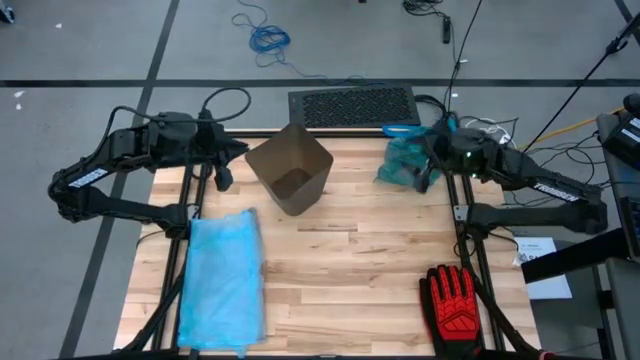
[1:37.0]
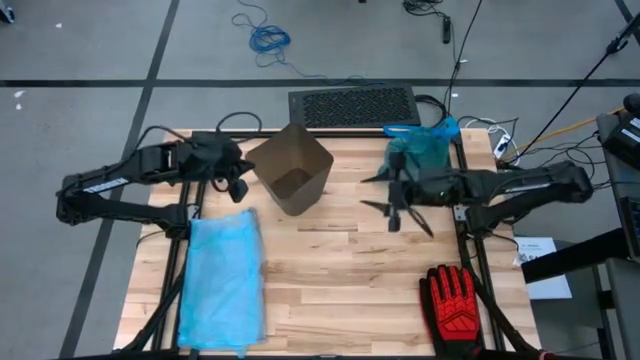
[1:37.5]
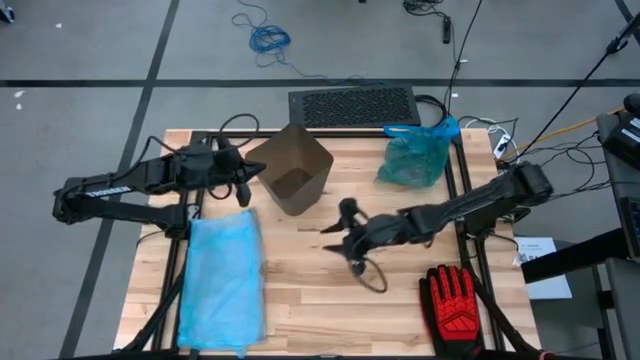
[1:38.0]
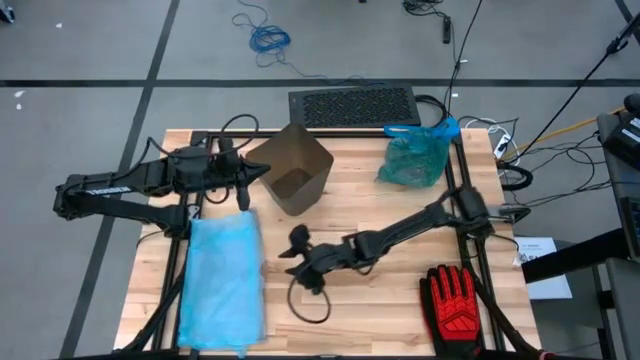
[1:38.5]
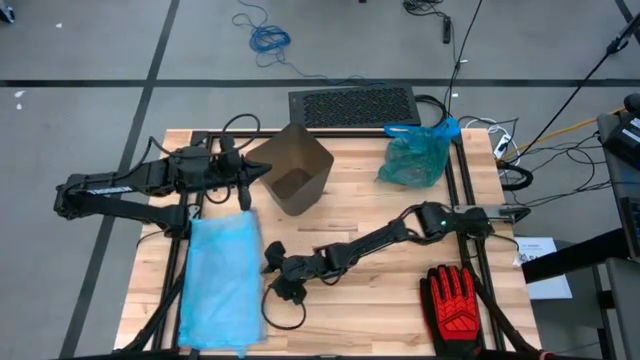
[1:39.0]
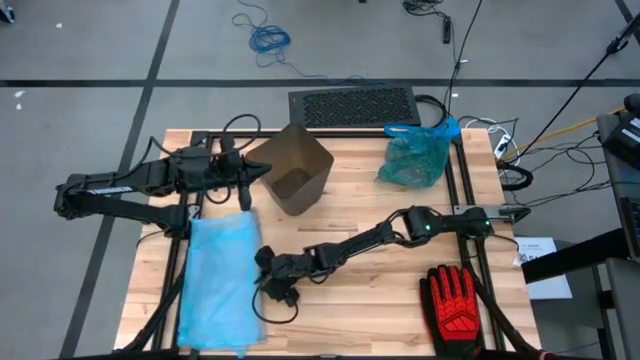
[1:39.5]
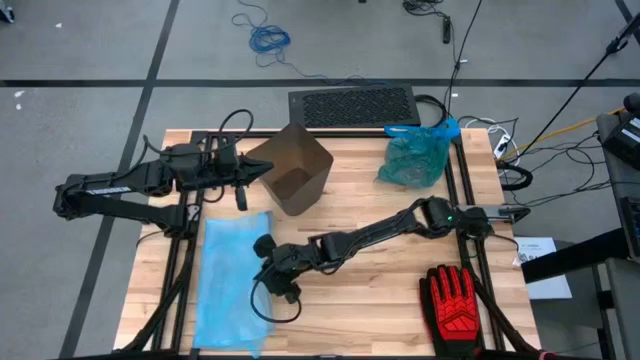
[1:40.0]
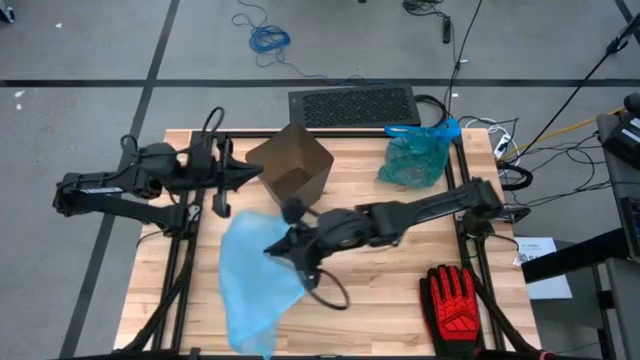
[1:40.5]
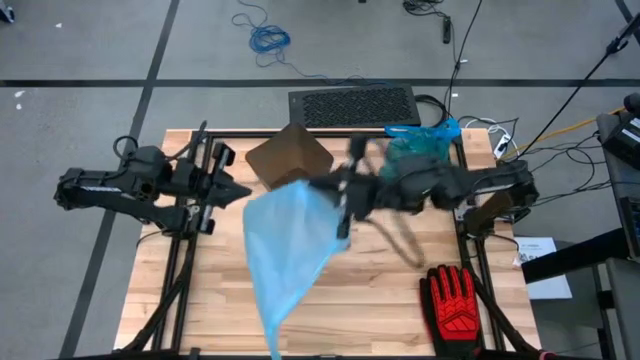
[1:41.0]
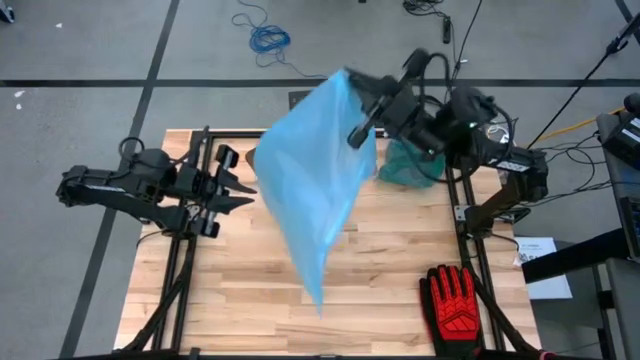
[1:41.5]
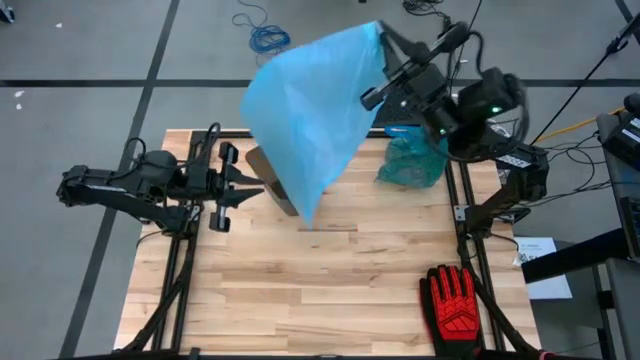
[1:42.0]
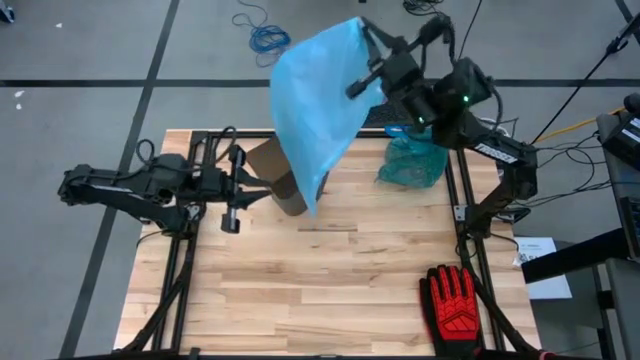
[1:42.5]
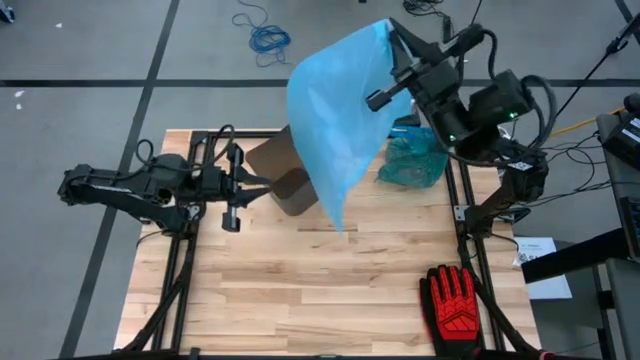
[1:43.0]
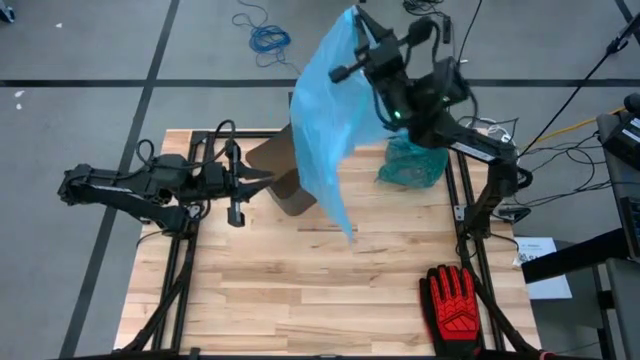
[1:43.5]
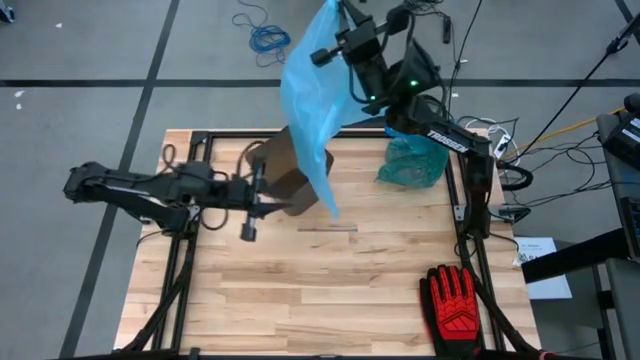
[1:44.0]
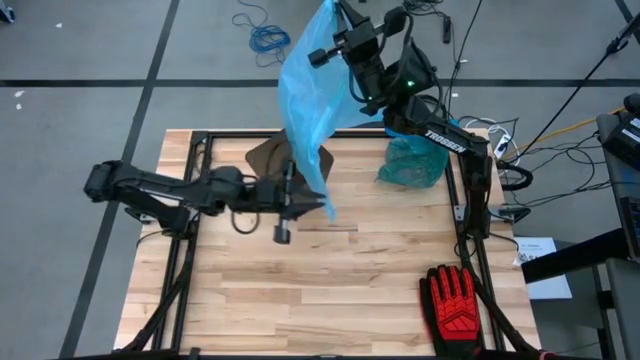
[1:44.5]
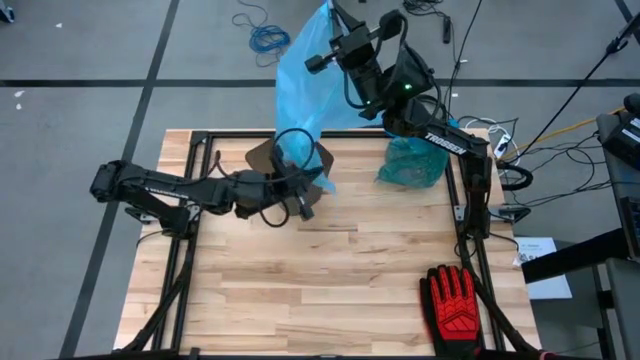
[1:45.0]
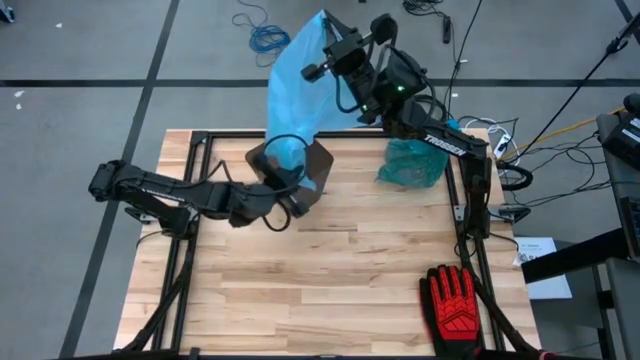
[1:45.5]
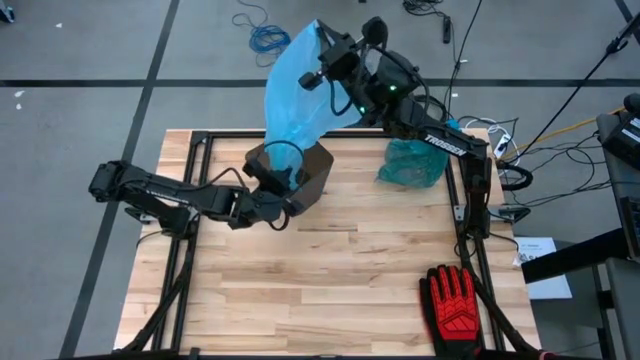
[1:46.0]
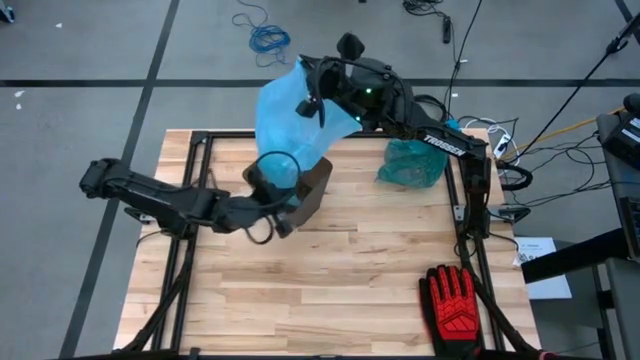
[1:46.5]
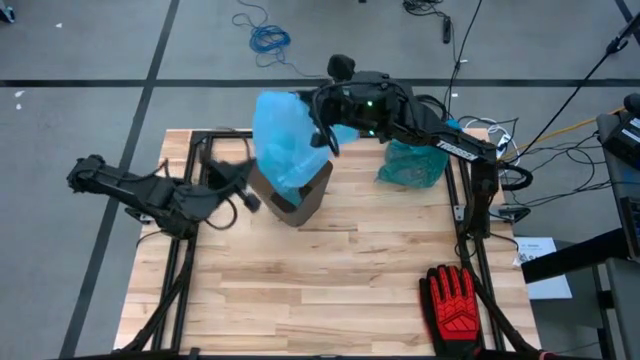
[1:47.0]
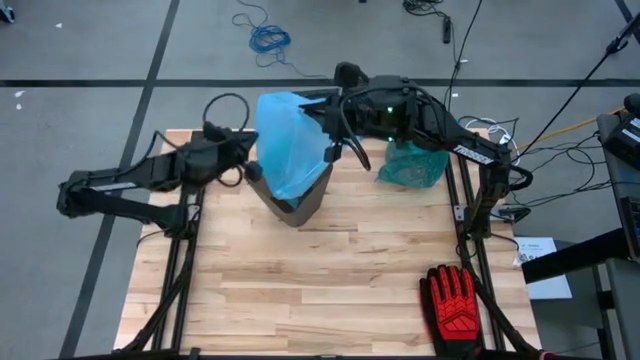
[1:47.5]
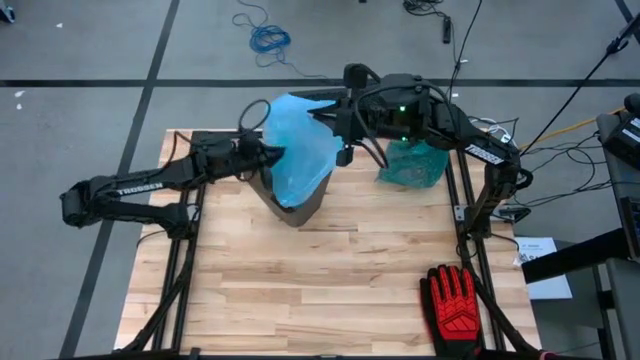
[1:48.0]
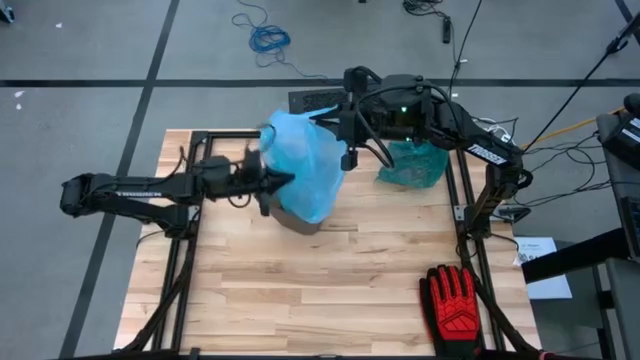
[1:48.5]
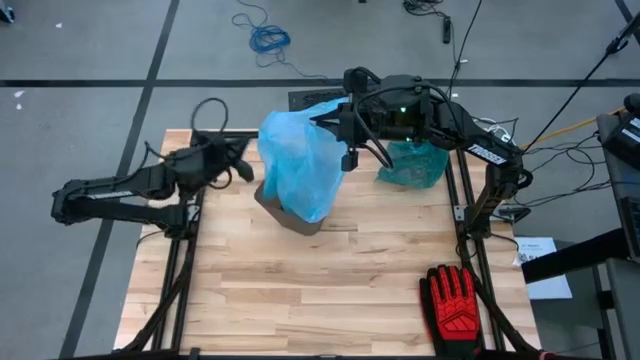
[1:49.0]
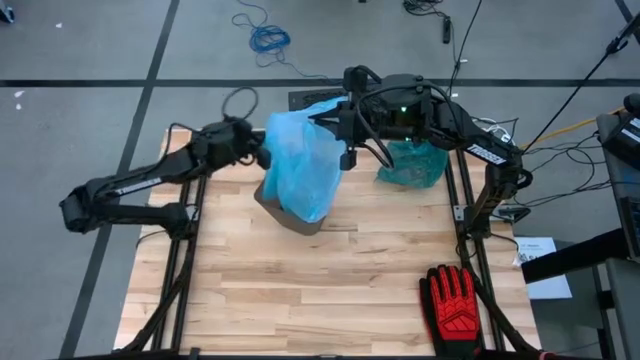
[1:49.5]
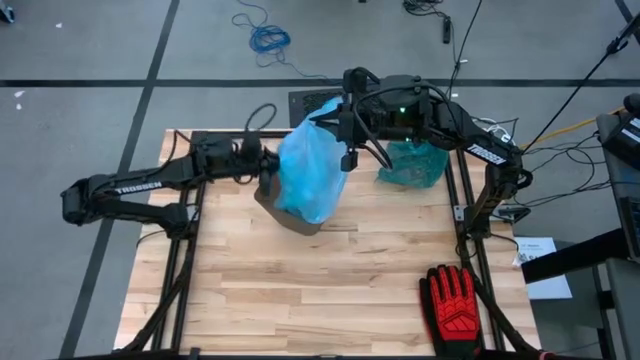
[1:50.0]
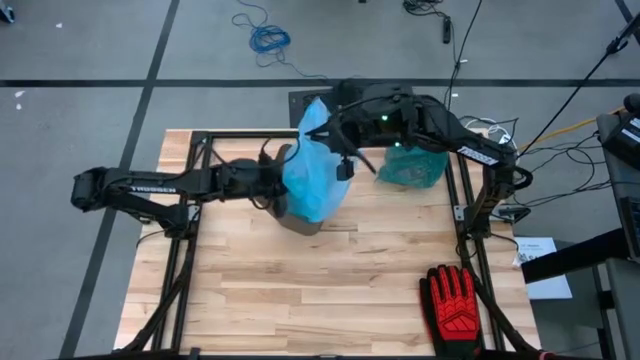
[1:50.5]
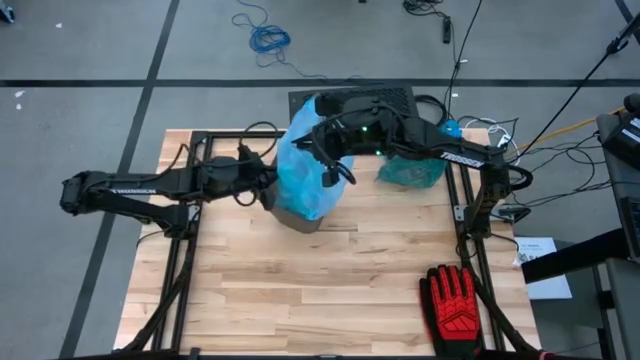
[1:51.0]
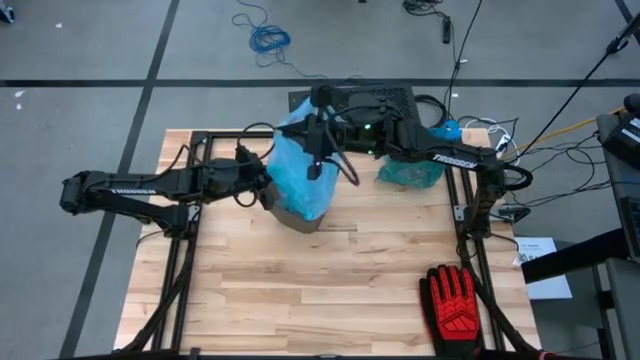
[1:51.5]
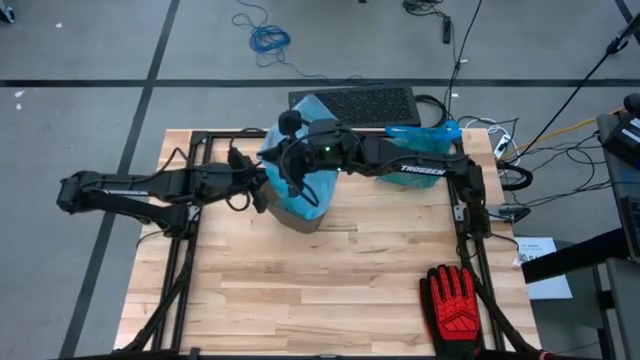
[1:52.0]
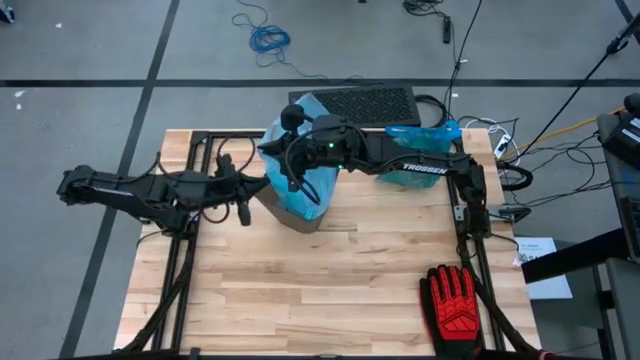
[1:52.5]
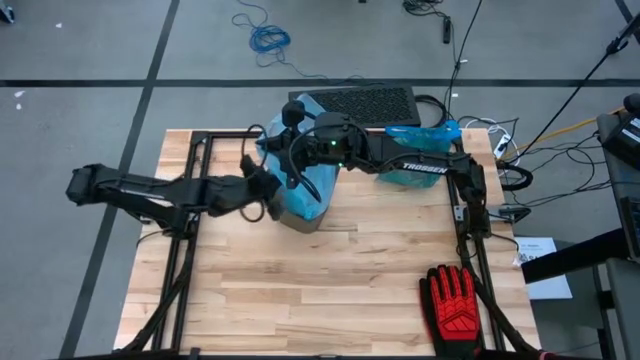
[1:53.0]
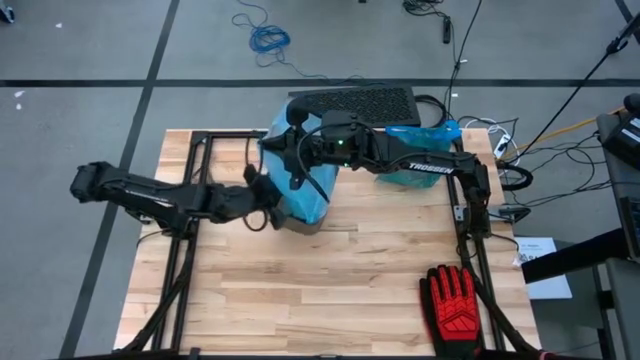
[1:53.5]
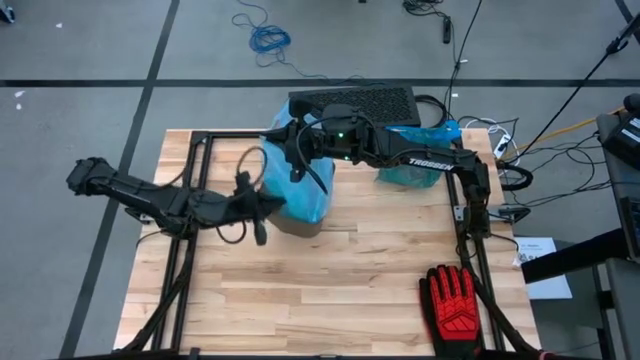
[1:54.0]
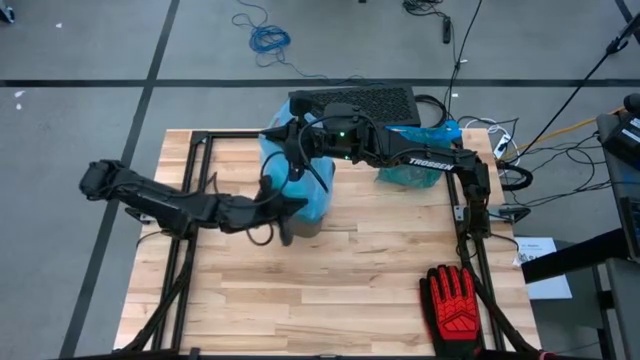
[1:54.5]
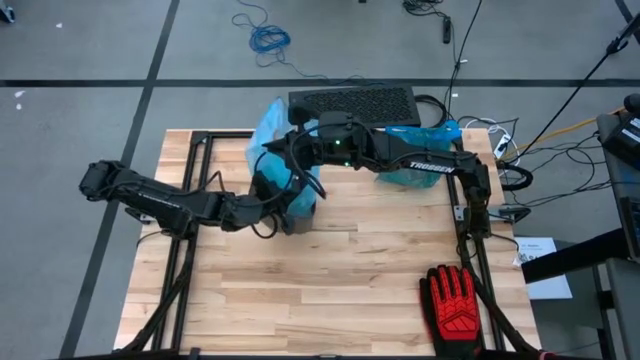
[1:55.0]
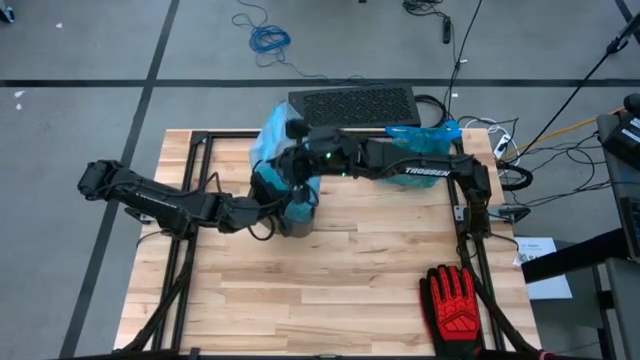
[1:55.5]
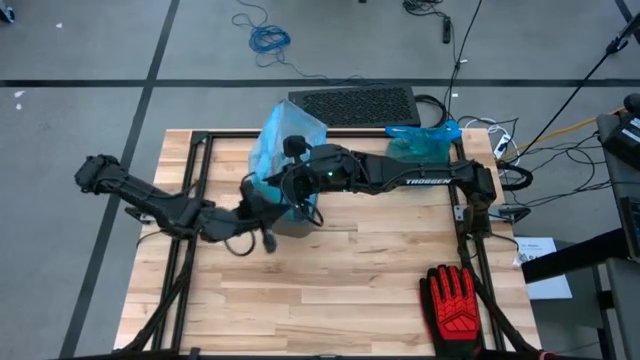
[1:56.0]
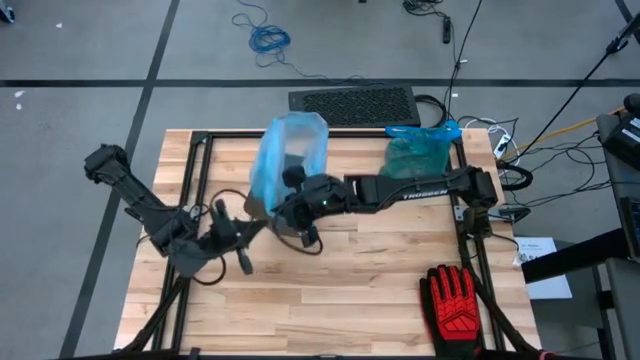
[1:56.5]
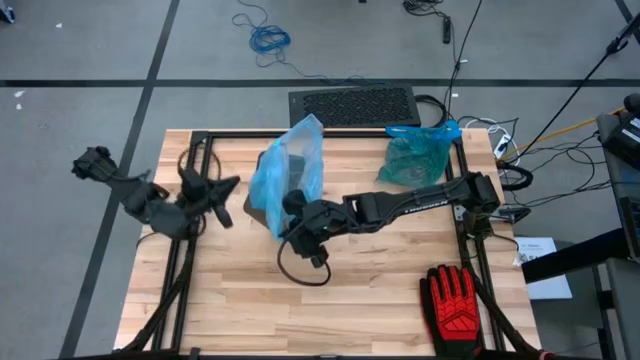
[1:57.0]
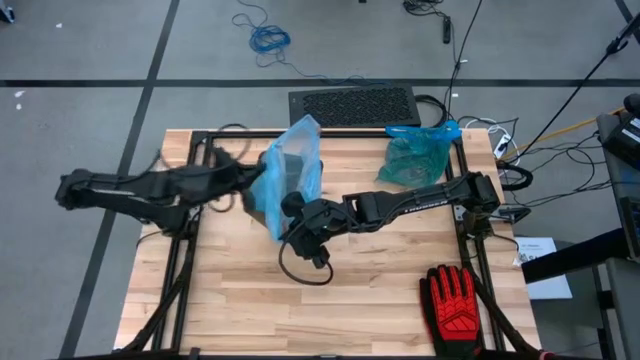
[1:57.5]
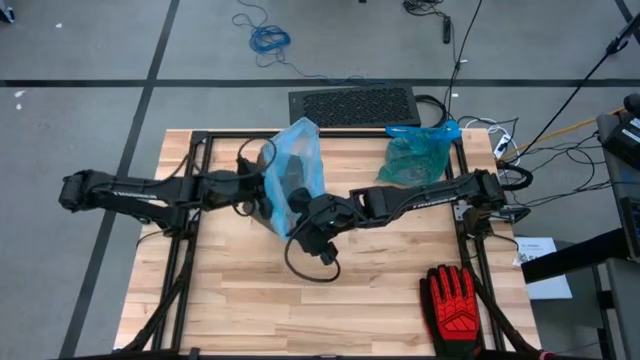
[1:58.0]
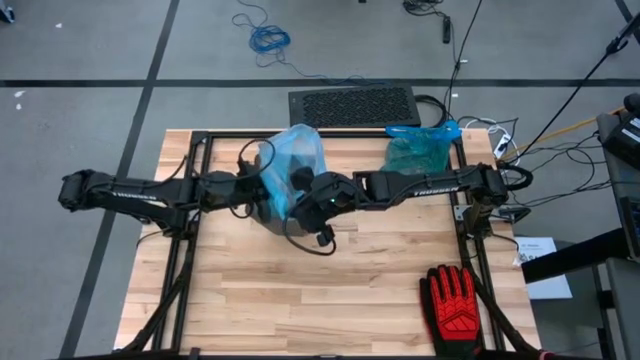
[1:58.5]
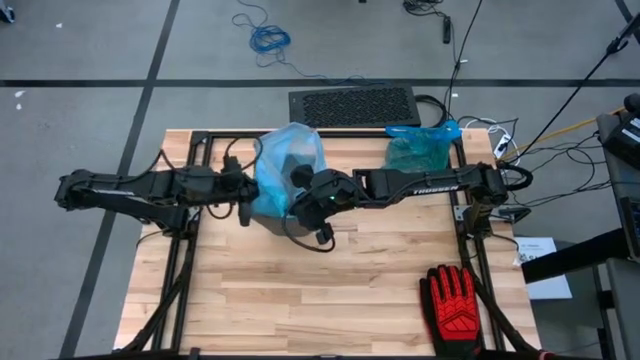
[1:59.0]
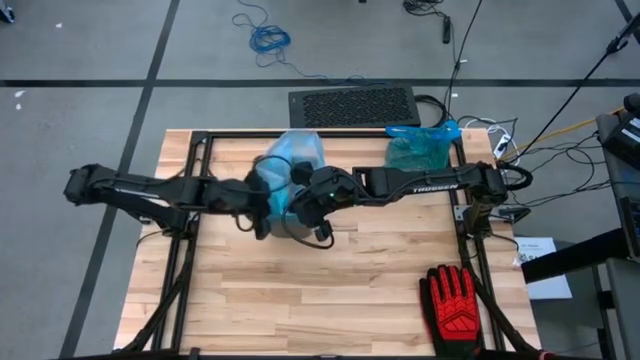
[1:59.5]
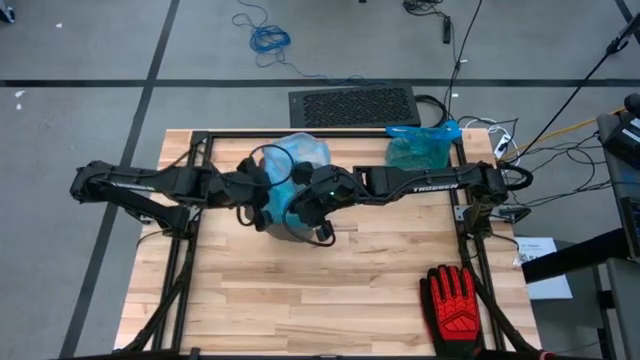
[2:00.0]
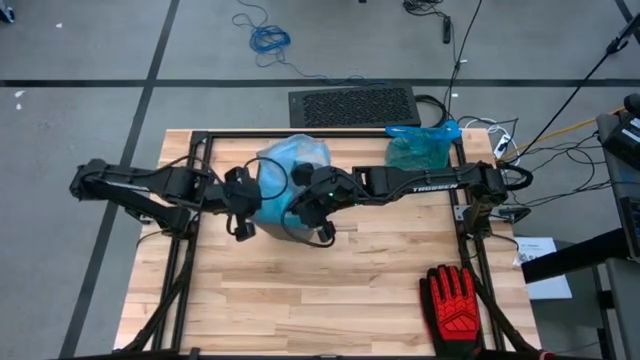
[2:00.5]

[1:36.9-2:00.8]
Task: place trash/remove bag and relplace
Insert the blue trash bag into the black trash bin
